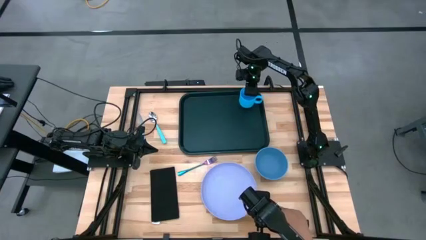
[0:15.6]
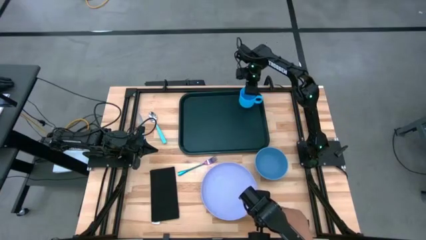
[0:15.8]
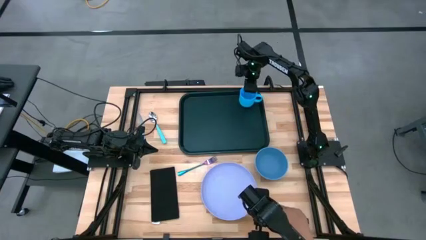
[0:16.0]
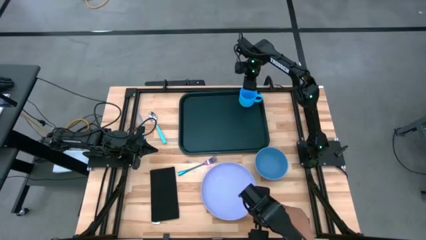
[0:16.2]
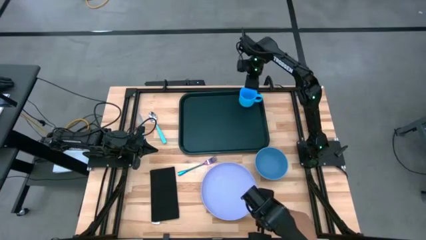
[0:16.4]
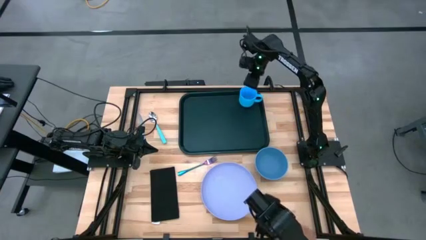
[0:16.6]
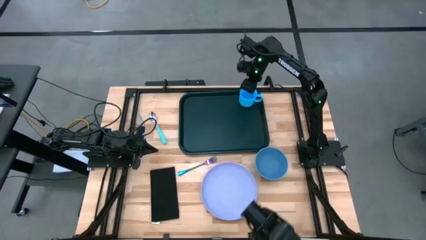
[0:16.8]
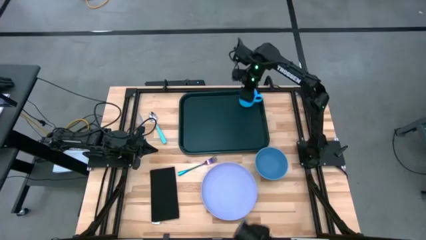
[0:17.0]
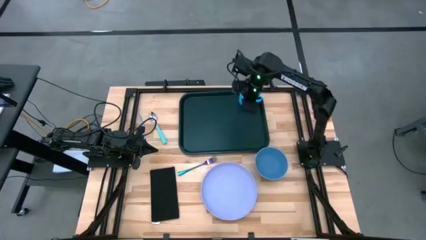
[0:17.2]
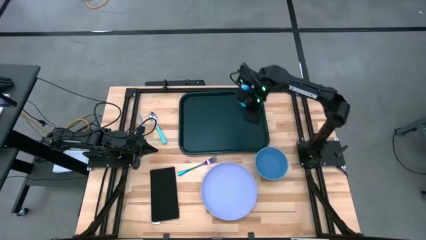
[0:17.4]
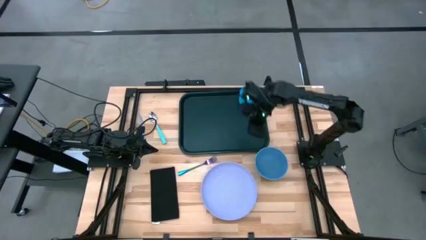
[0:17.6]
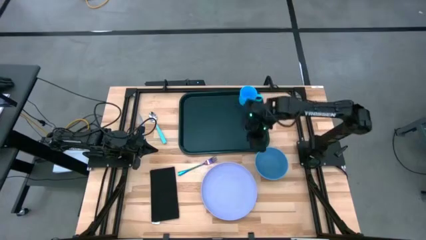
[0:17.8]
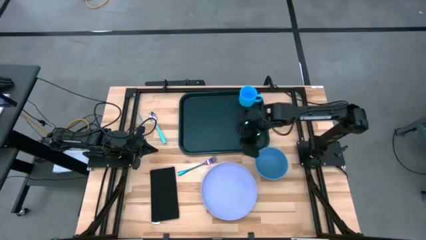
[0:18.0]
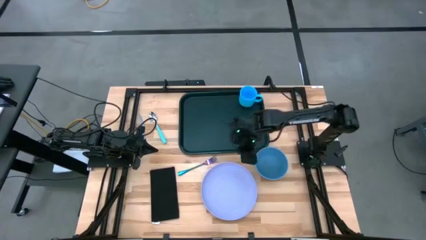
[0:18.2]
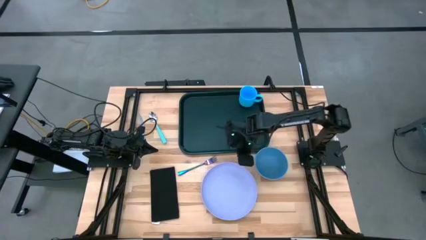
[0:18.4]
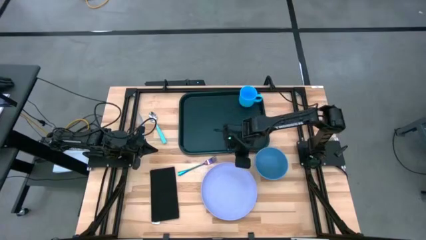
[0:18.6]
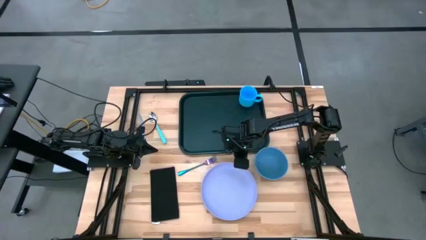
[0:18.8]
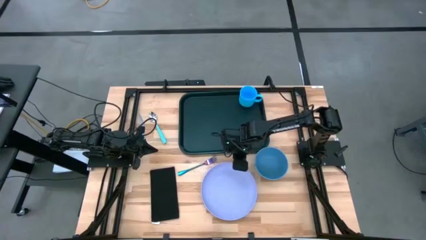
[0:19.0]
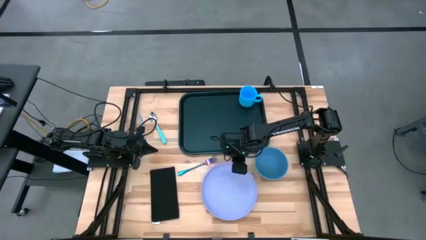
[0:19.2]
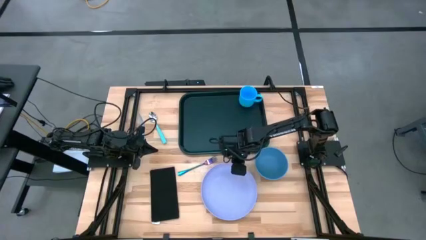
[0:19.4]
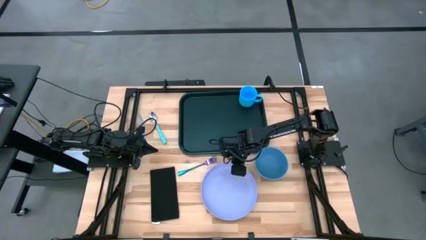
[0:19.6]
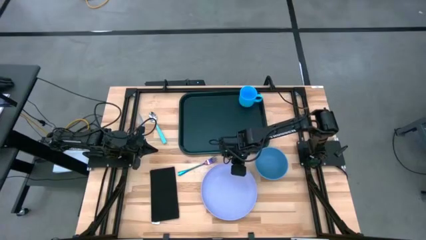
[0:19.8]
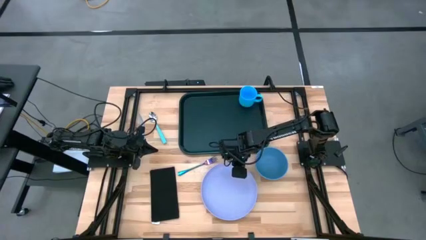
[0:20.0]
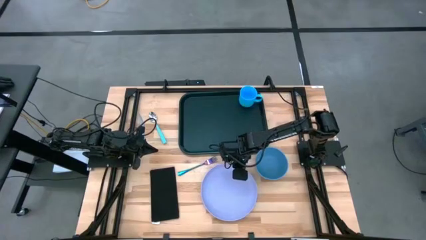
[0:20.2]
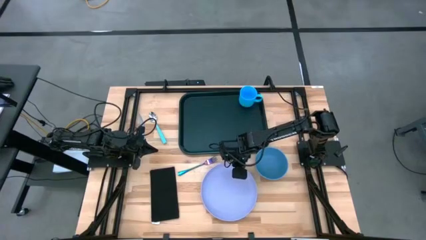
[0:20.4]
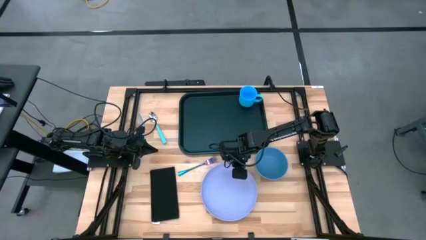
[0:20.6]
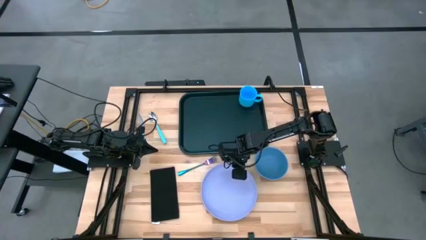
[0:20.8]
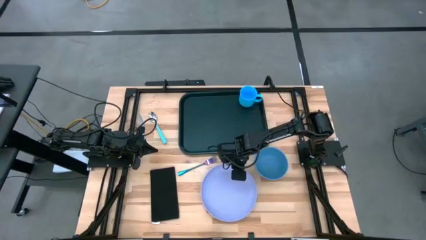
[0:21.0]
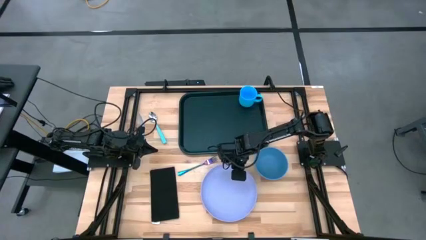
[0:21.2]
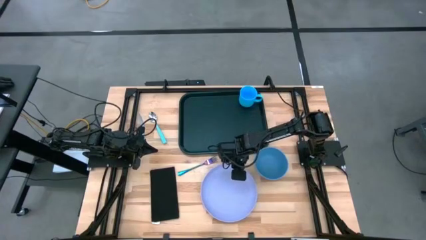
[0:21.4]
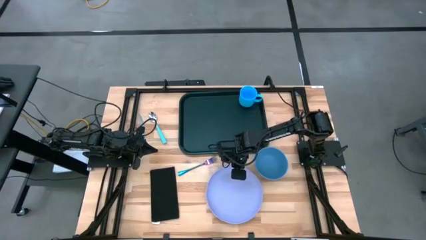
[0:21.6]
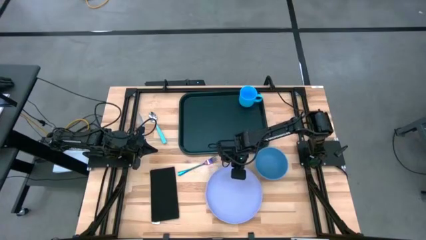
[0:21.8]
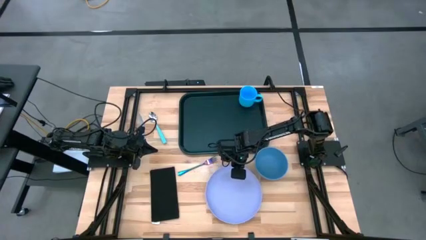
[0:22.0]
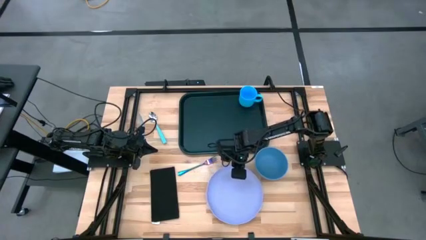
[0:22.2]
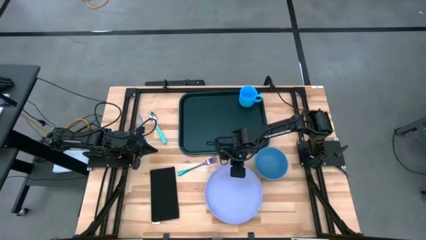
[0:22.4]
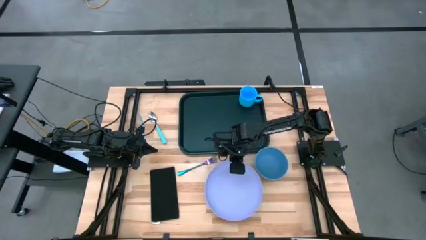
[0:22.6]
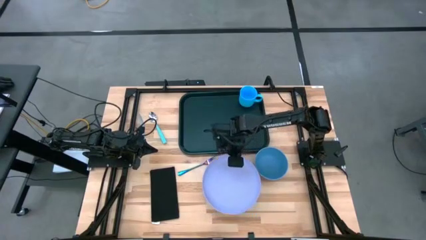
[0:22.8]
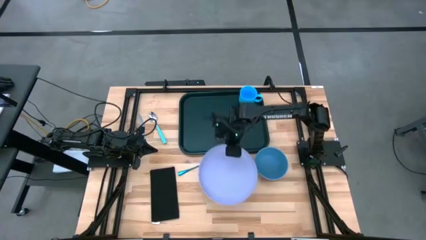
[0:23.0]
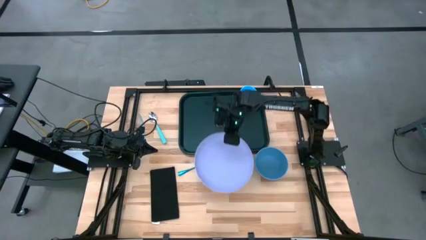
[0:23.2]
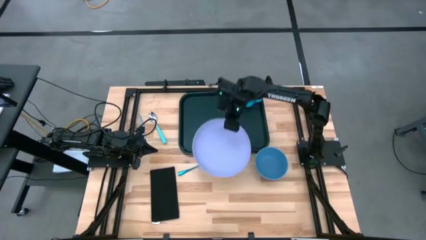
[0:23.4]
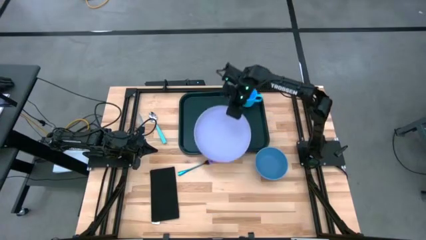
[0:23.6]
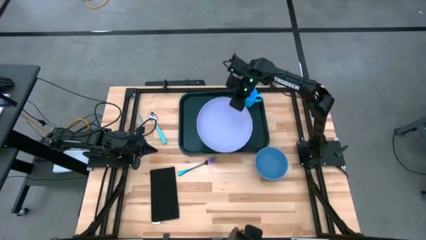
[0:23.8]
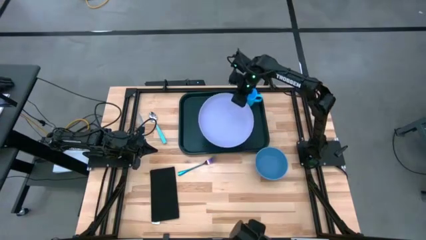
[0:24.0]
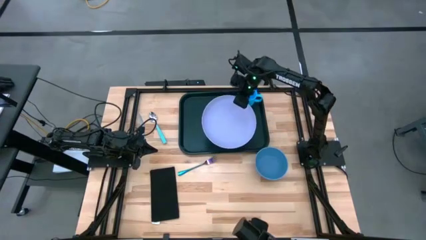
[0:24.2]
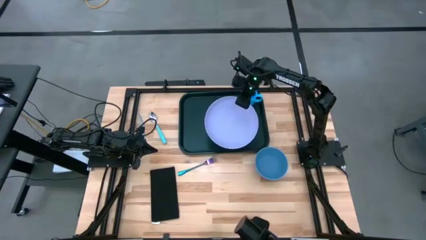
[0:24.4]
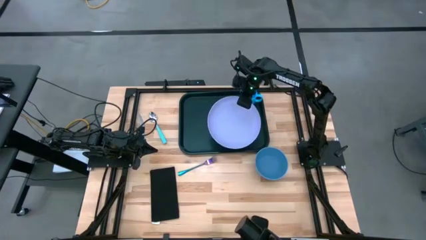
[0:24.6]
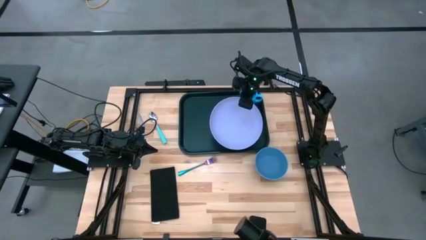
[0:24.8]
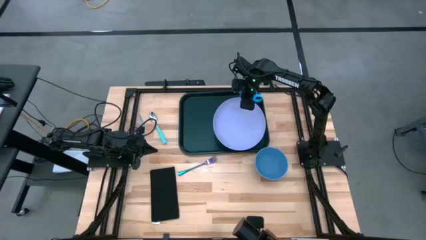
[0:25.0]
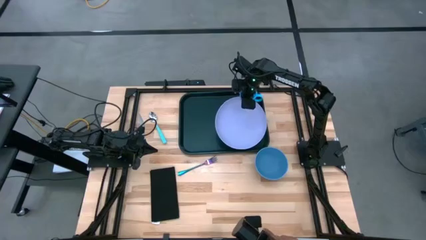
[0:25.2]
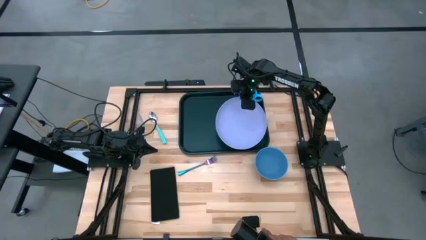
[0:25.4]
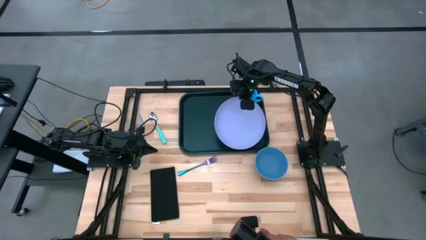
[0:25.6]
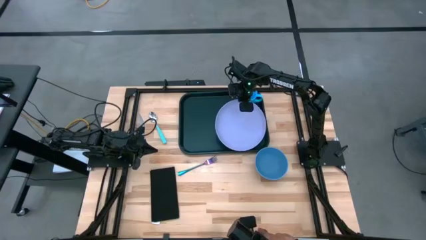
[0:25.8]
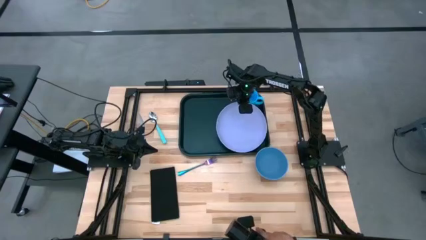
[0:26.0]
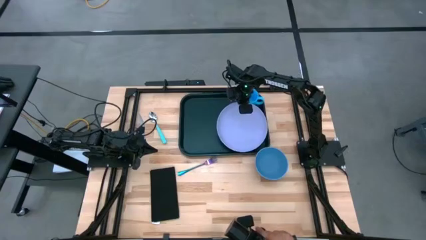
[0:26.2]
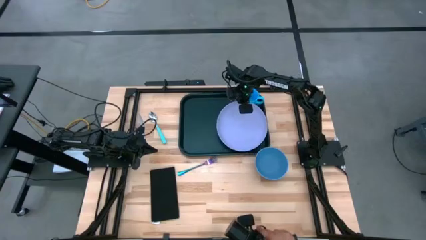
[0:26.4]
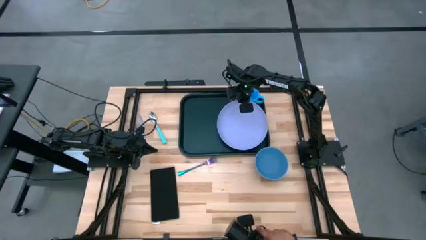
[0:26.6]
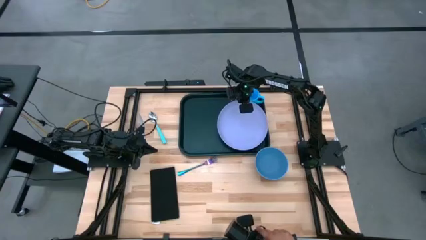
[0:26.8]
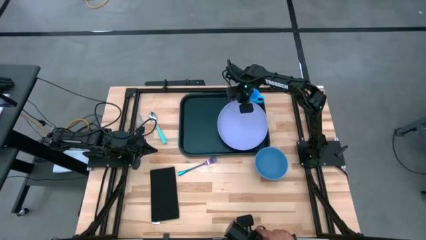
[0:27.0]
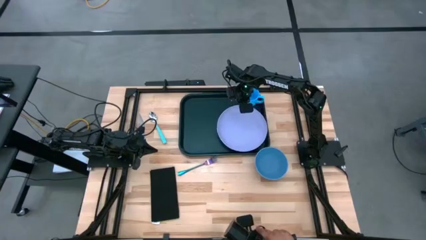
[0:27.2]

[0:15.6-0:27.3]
Task: Set up tray
Put the violet plate on the black serving tray
